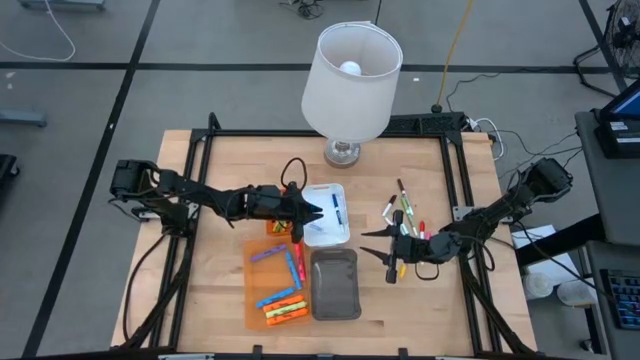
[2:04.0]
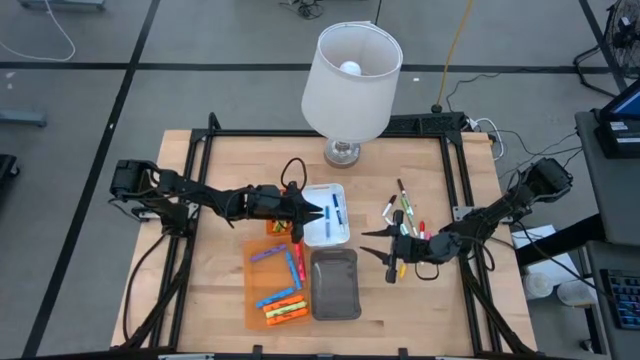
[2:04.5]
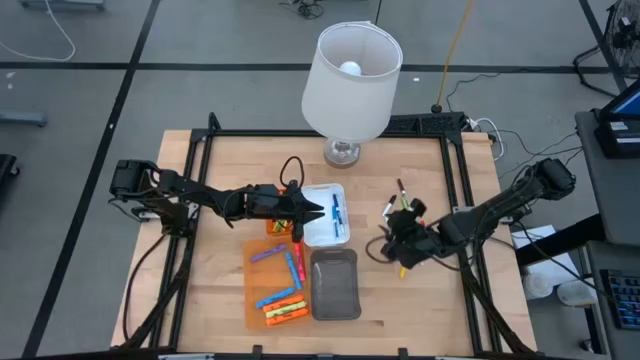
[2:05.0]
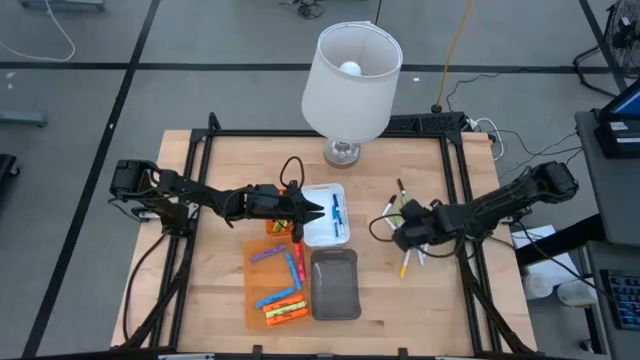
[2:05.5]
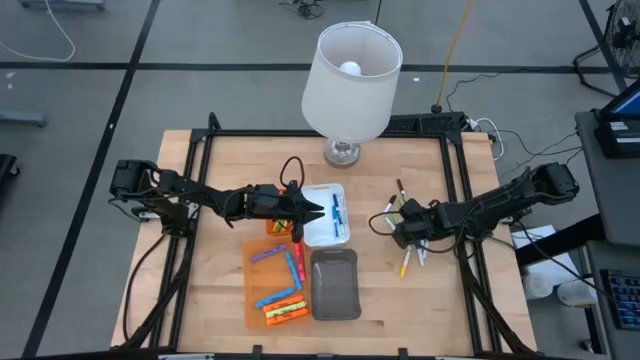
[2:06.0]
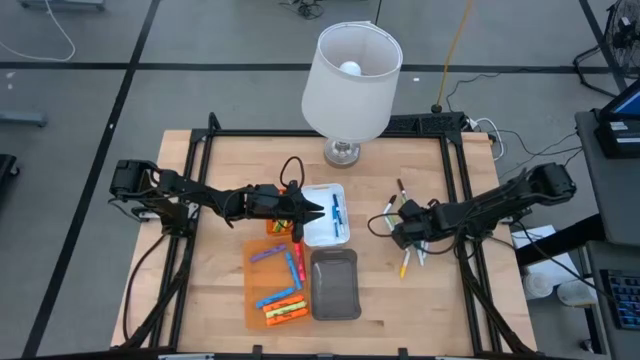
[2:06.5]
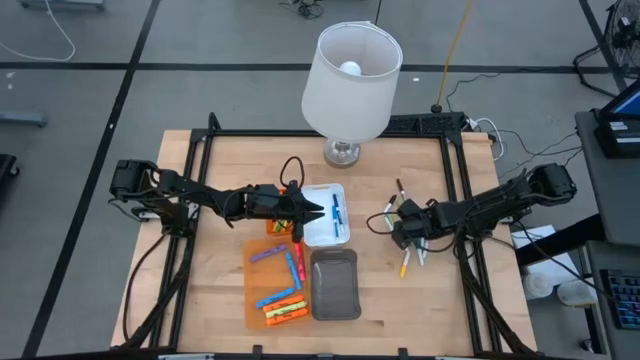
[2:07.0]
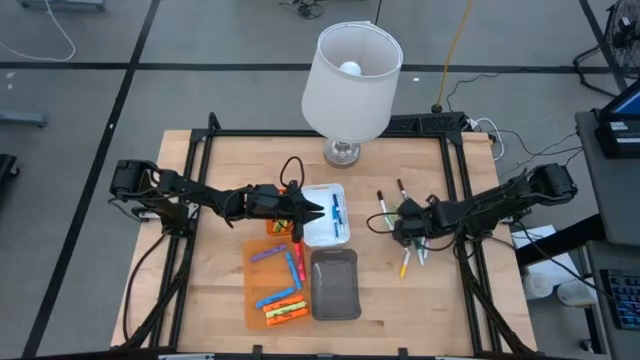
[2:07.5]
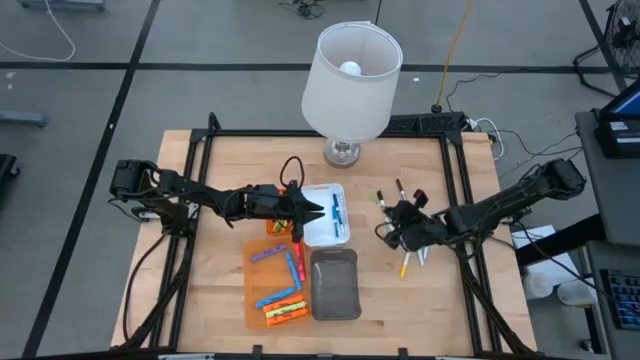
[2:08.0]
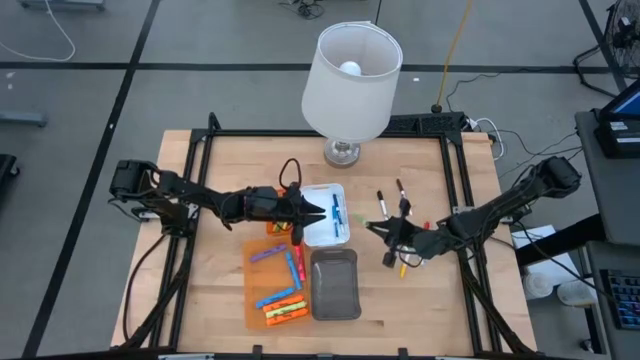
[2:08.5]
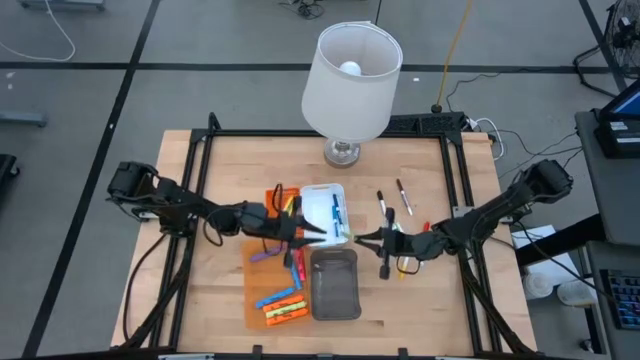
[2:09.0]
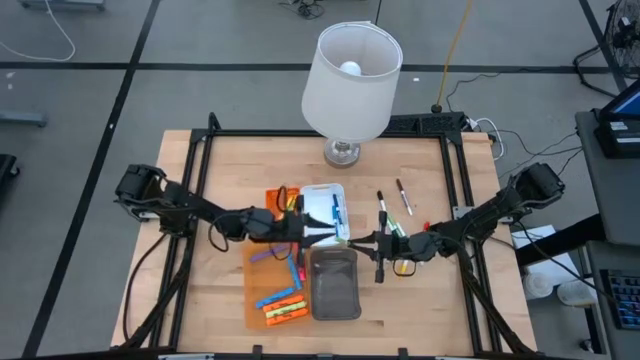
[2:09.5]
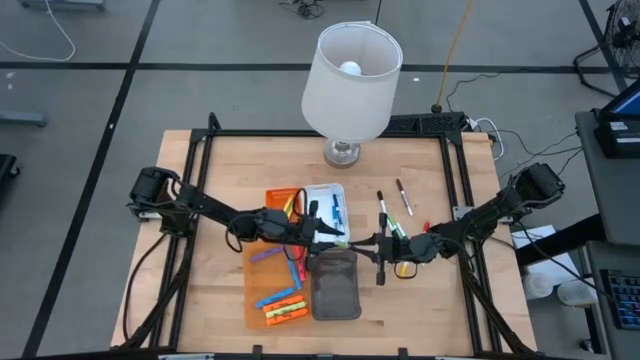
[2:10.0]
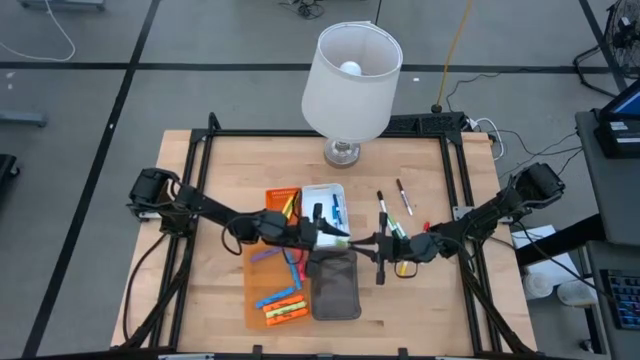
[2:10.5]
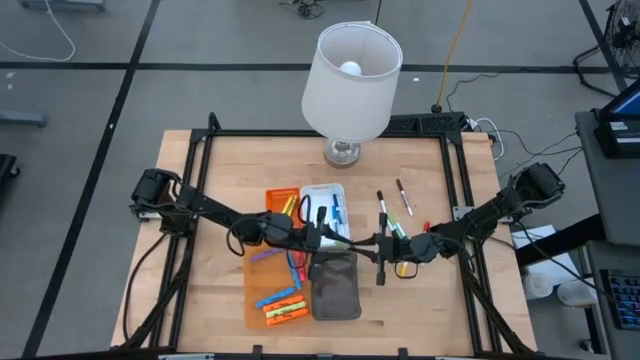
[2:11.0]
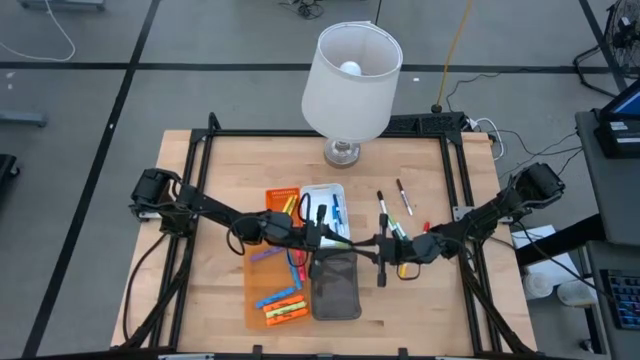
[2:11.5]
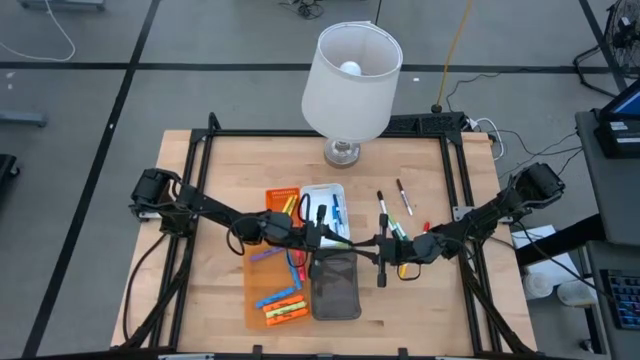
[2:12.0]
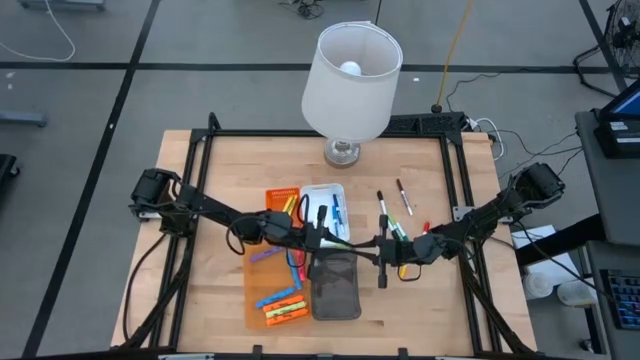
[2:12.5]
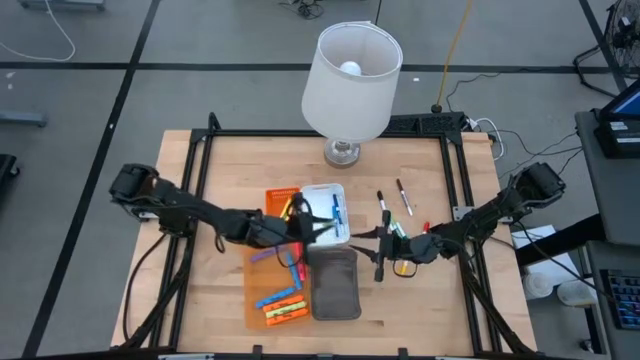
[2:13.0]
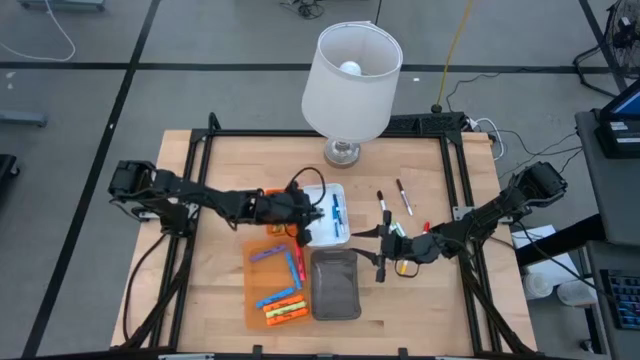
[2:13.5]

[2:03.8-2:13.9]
Task: Pick & Place Markers
Put the right light green marker pen into the white bin

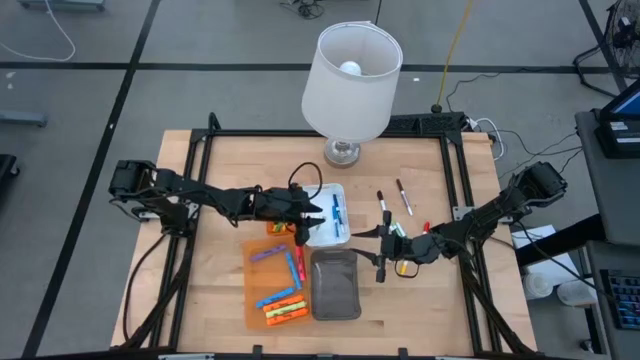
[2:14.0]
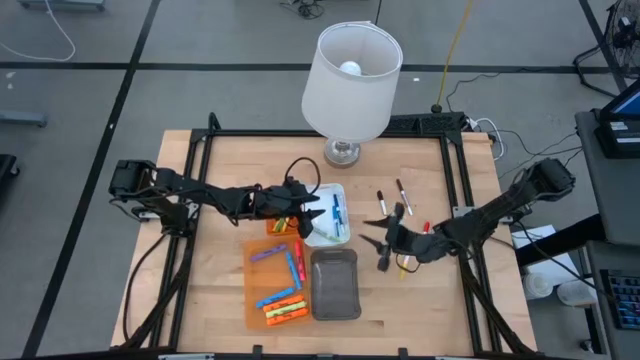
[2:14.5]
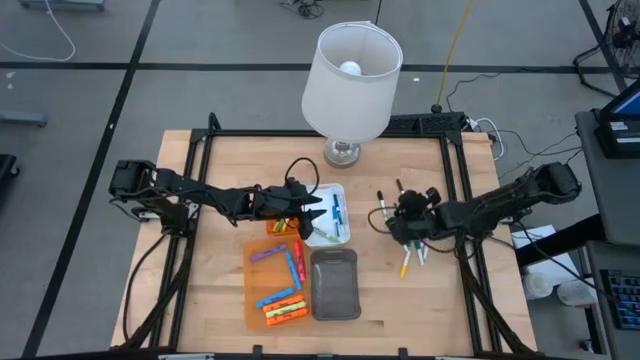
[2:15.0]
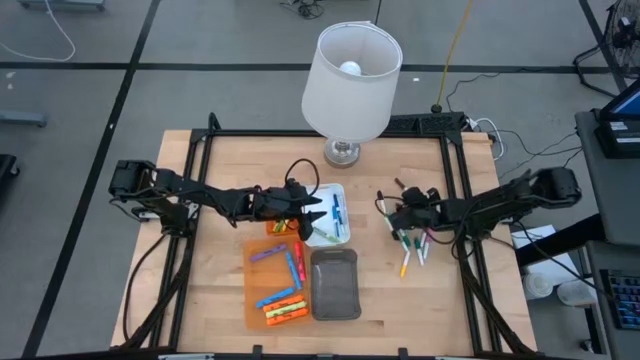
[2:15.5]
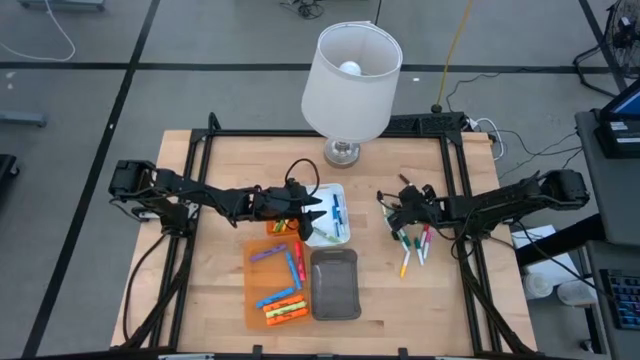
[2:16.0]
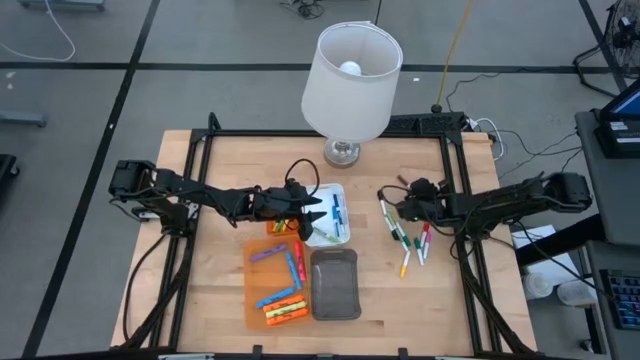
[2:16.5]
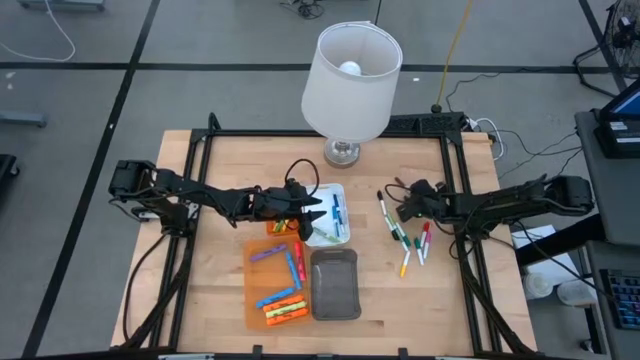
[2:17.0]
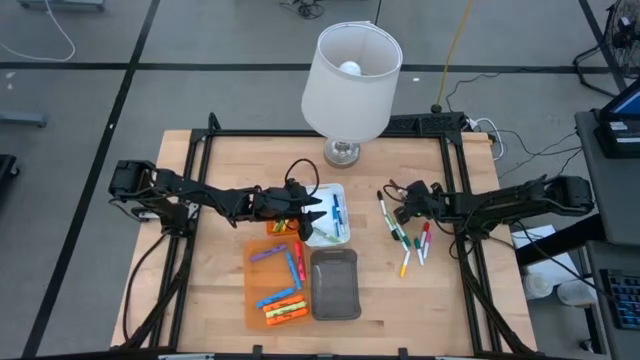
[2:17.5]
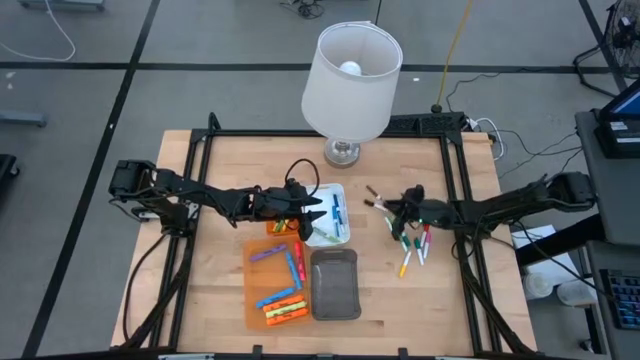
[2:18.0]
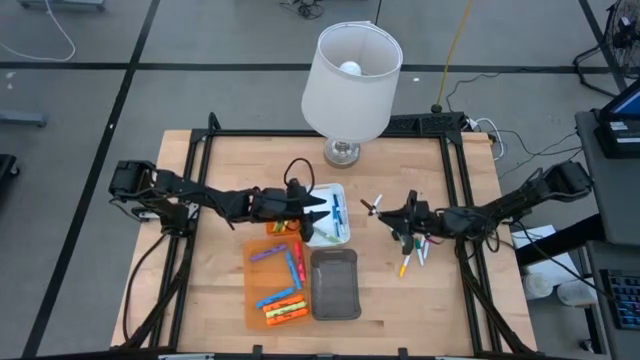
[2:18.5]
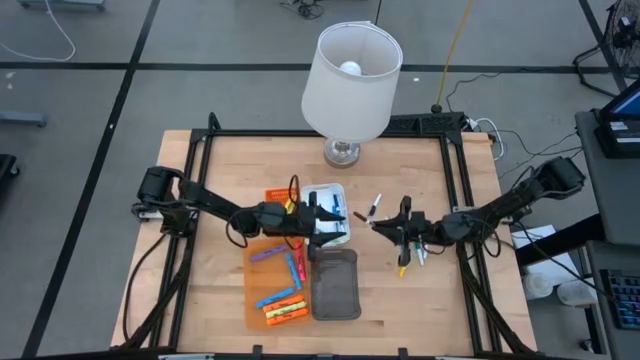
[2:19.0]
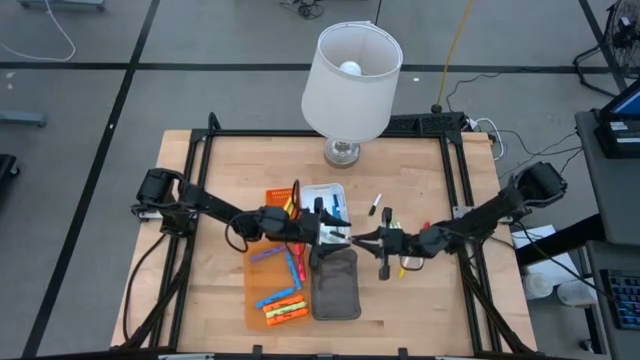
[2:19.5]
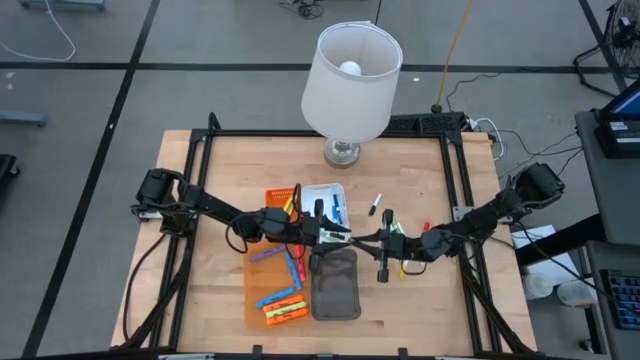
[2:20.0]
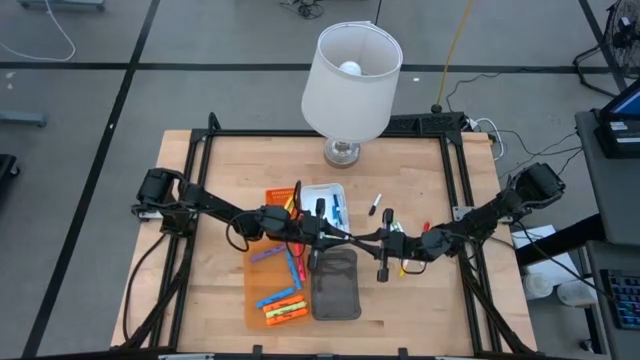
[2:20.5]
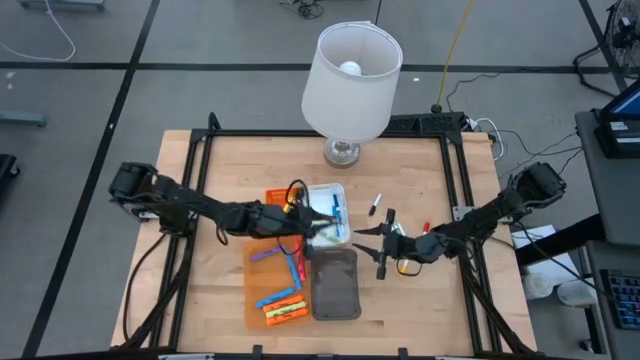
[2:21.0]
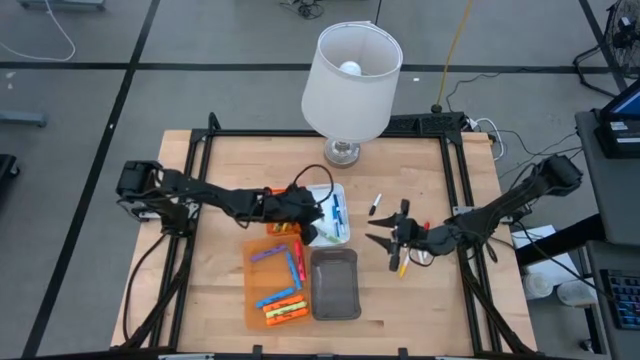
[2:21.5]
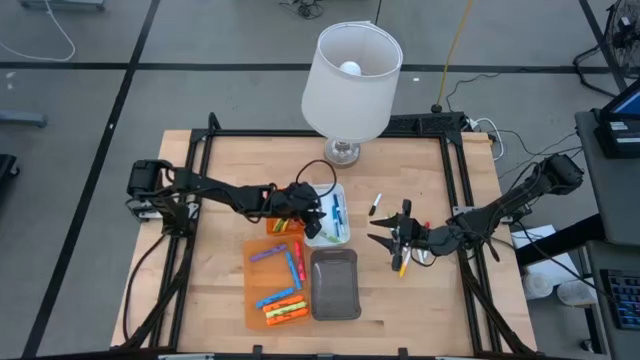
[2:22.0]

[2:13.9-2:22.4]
Put the brown marker pen into the white bin

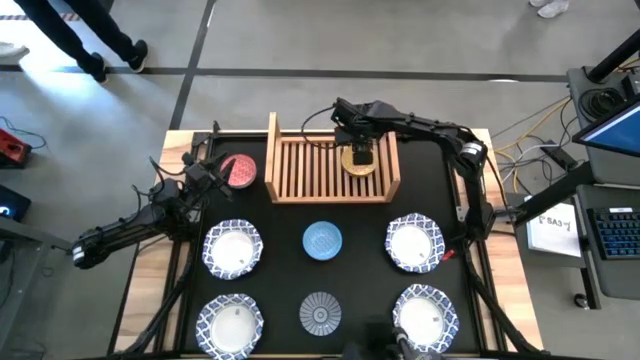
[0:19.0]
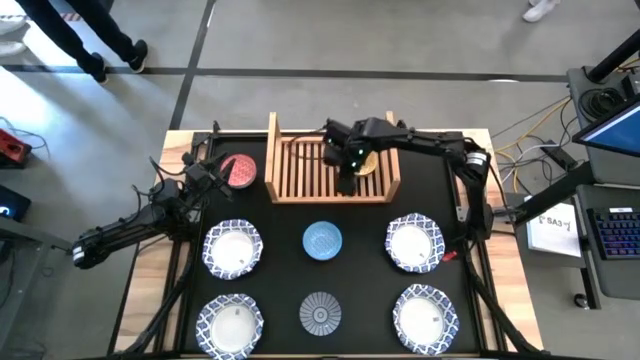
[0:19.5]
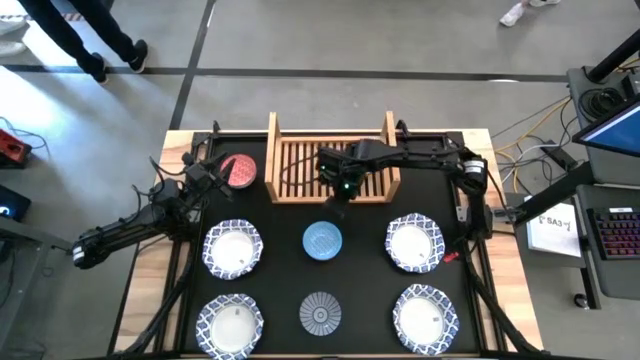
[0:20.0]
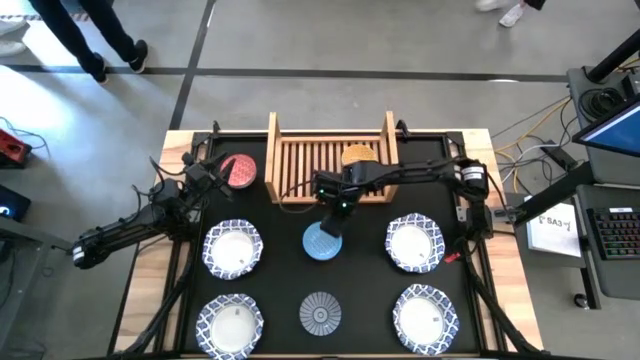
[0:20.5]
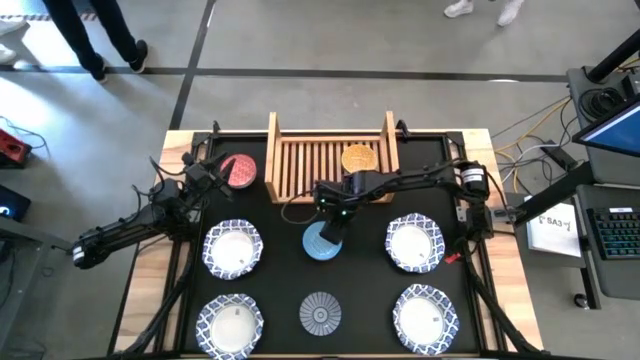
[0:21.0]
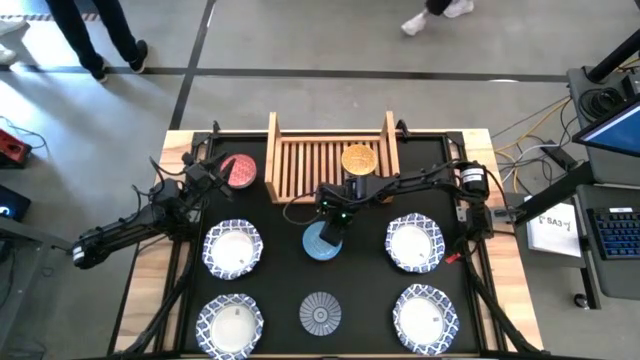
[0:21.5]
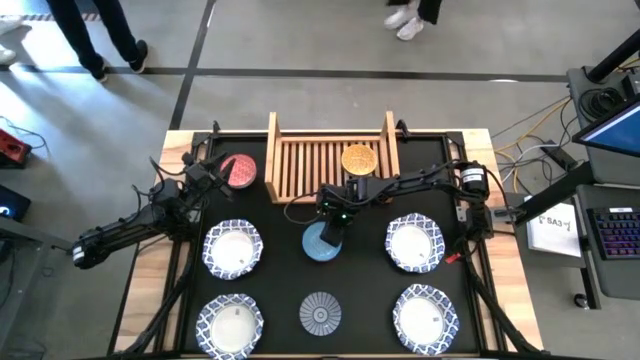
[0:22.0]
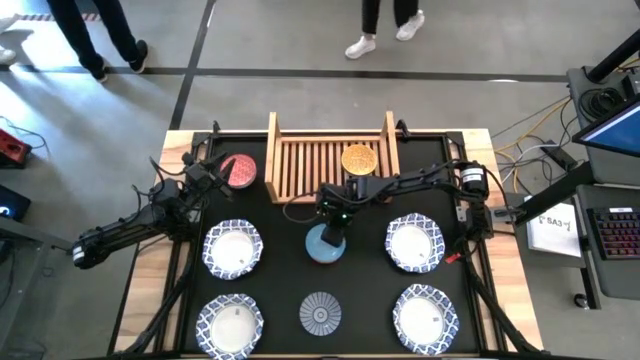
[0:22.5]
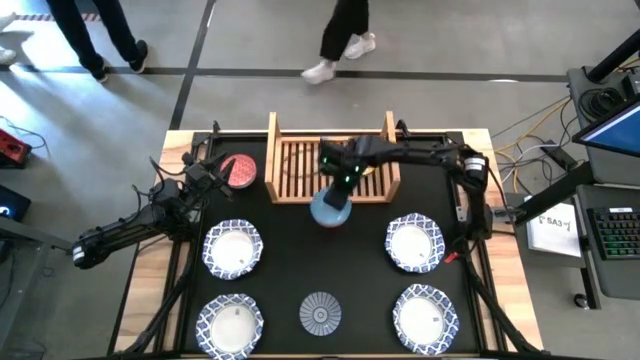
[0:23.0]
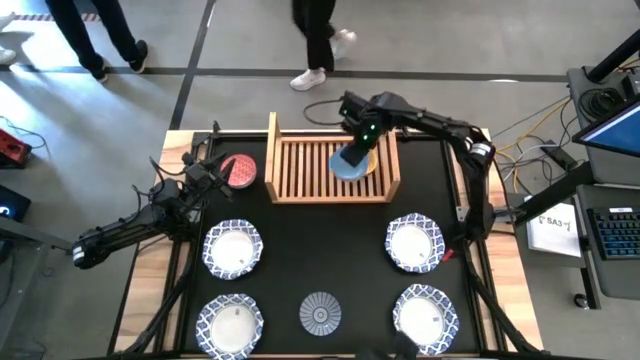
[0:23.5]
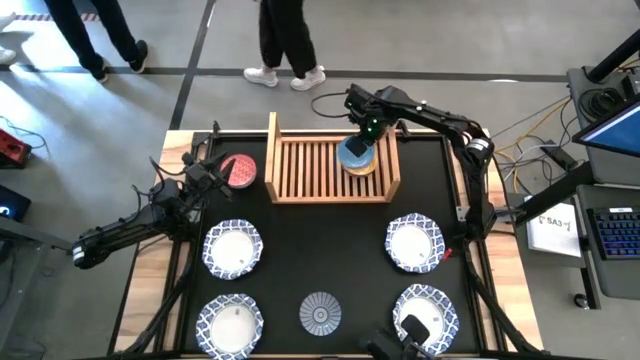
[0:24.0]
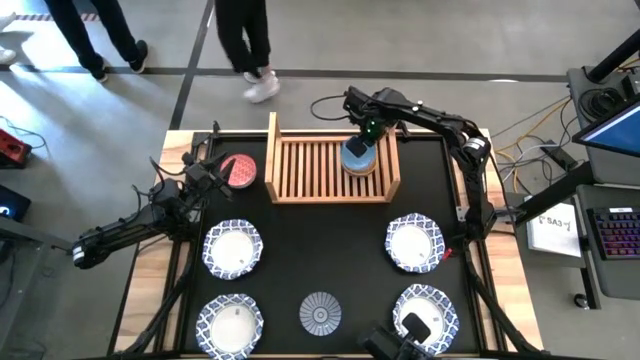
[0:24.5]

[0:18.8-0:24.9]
Task: Place and stack bowls onto a shelf
Stack the light blue patterned bowl on top of the yellow patterned bowl on the shelf
